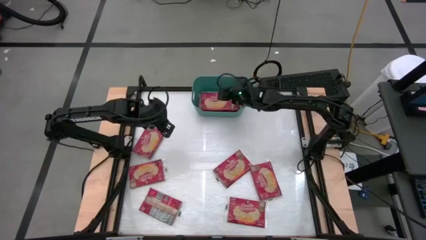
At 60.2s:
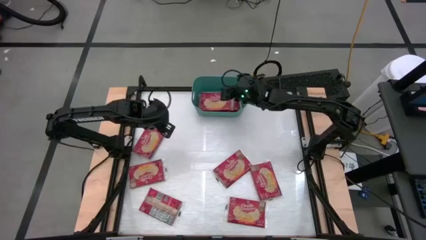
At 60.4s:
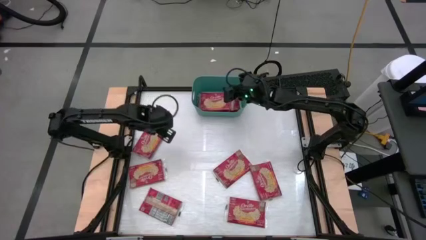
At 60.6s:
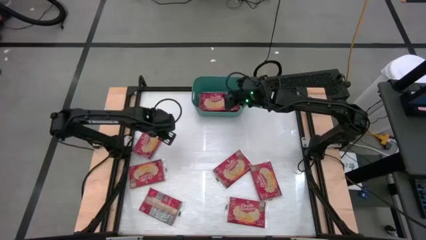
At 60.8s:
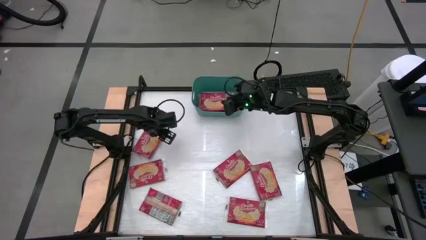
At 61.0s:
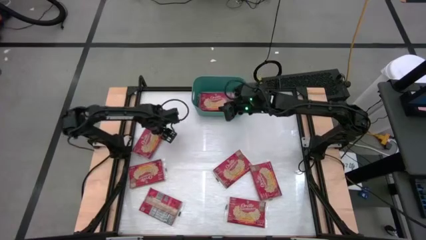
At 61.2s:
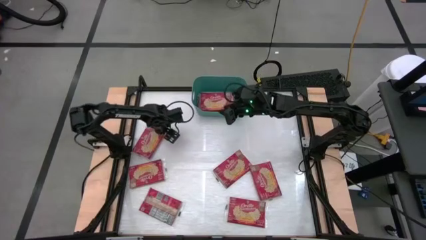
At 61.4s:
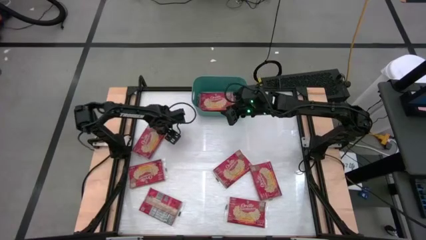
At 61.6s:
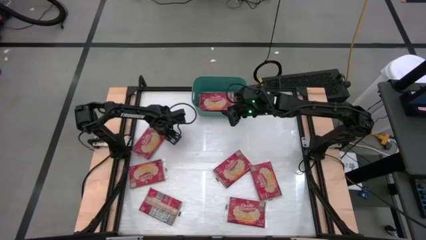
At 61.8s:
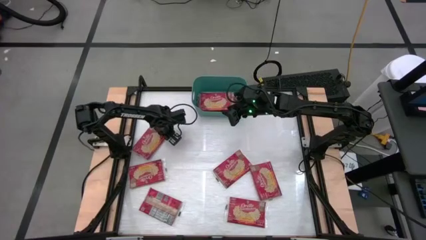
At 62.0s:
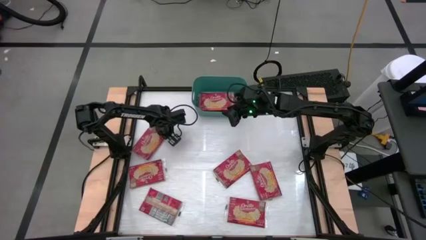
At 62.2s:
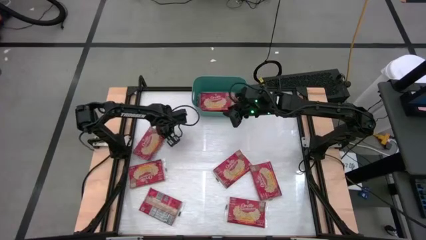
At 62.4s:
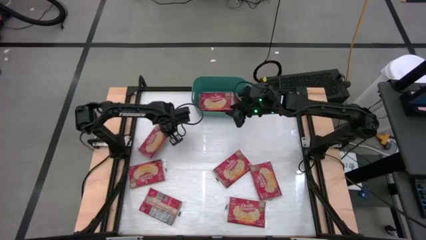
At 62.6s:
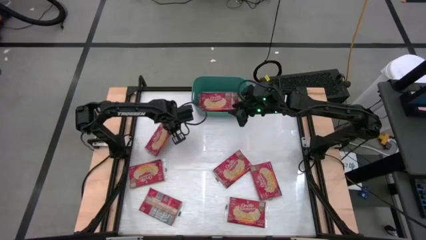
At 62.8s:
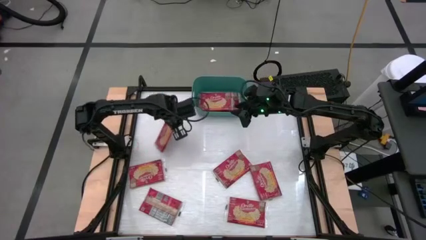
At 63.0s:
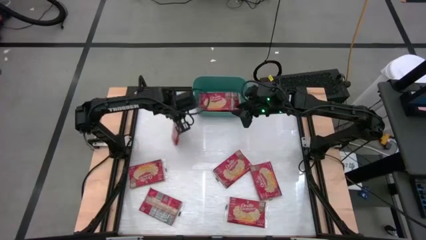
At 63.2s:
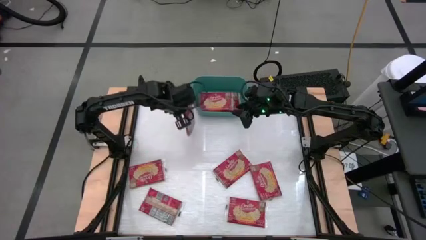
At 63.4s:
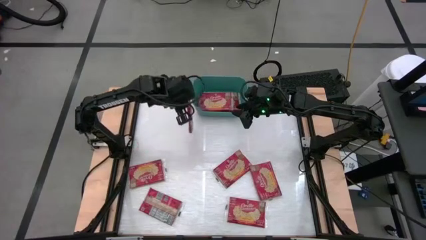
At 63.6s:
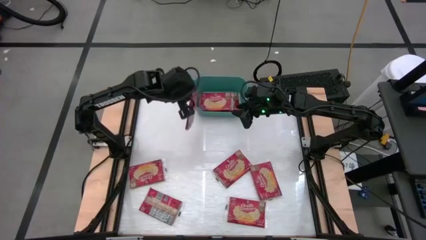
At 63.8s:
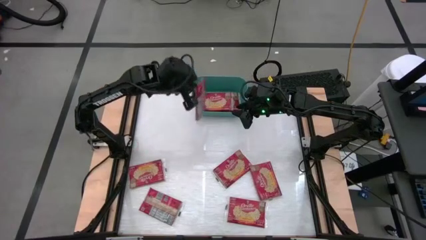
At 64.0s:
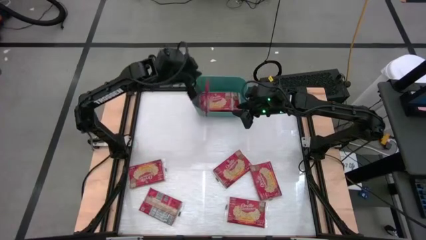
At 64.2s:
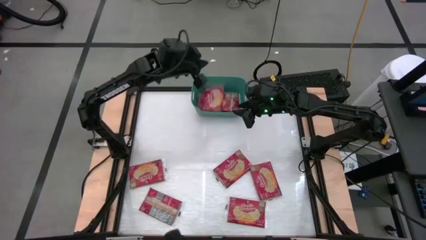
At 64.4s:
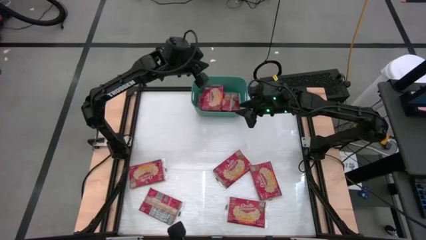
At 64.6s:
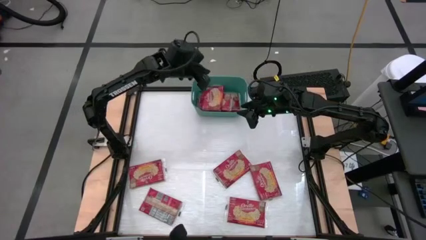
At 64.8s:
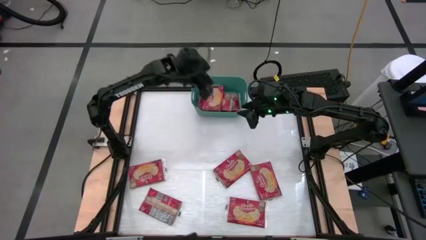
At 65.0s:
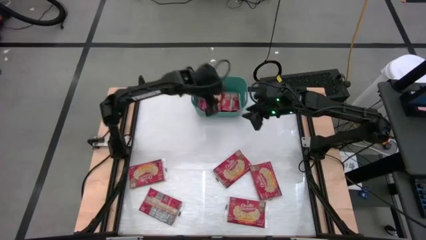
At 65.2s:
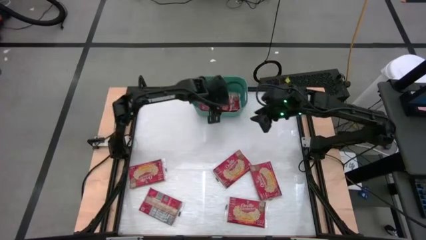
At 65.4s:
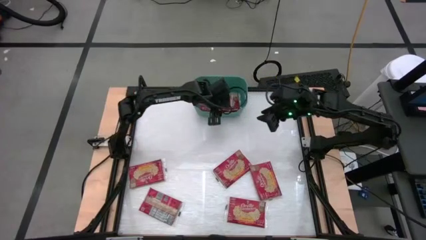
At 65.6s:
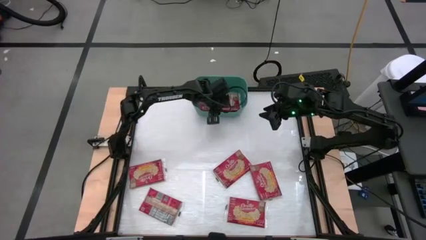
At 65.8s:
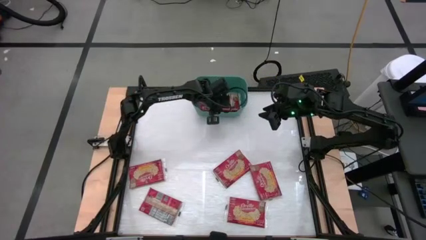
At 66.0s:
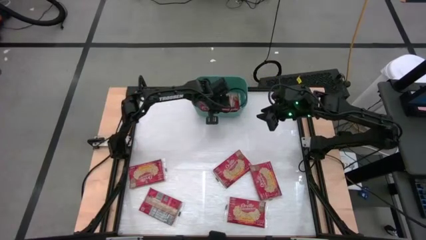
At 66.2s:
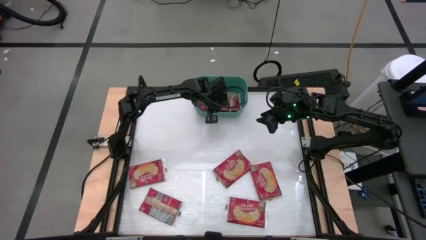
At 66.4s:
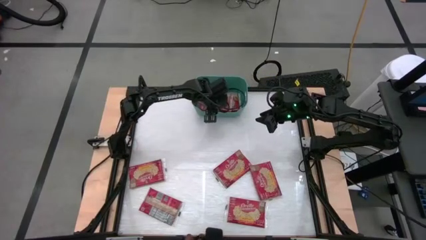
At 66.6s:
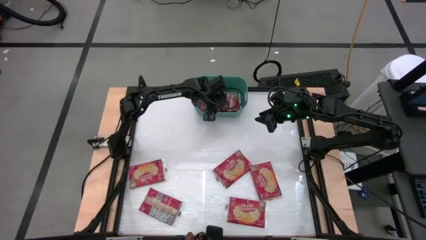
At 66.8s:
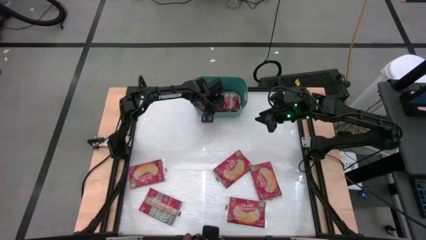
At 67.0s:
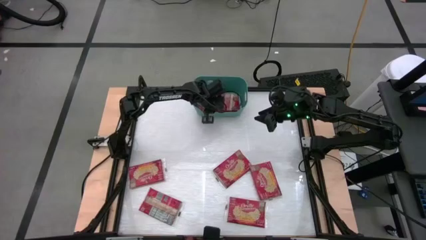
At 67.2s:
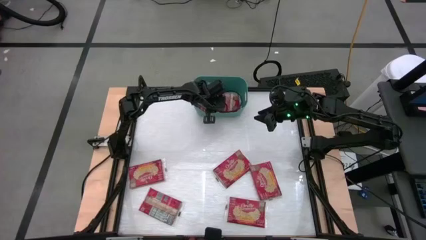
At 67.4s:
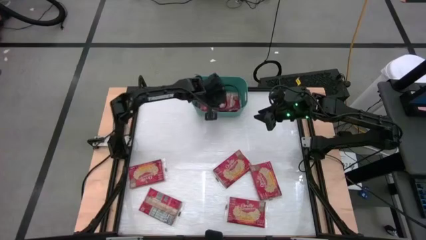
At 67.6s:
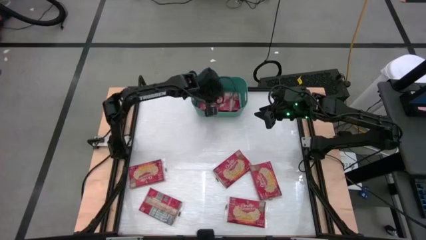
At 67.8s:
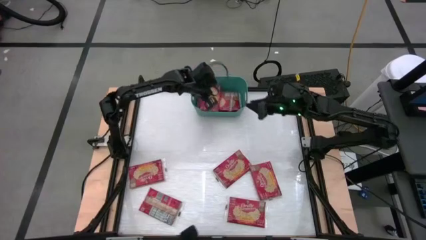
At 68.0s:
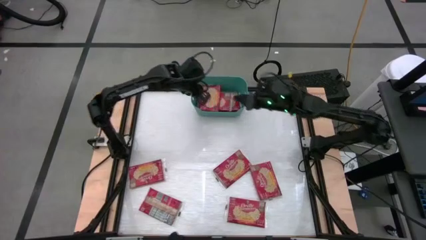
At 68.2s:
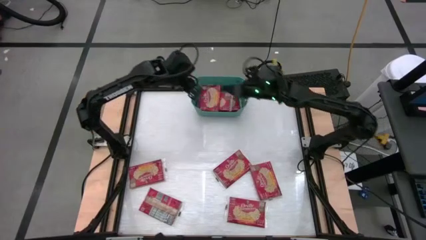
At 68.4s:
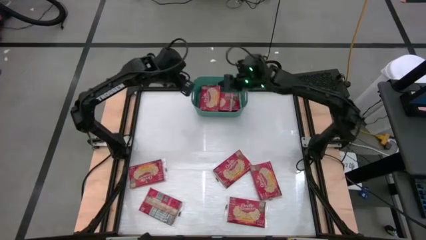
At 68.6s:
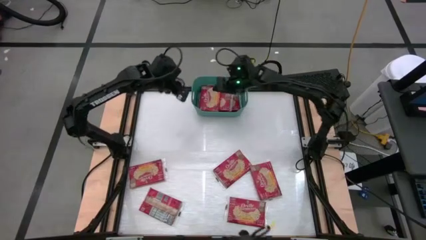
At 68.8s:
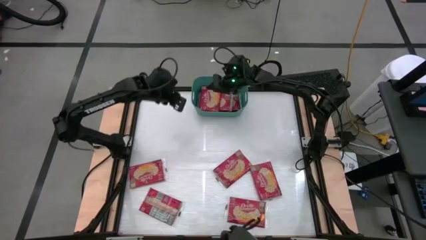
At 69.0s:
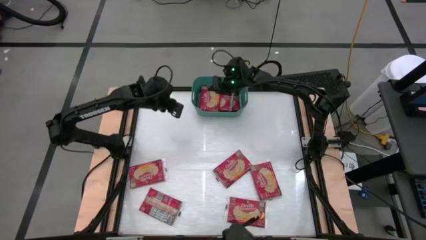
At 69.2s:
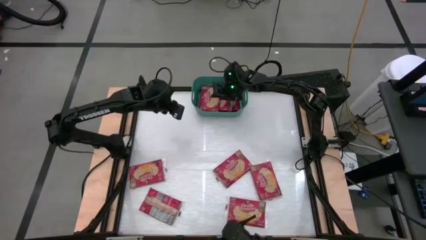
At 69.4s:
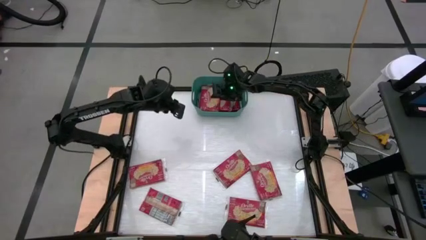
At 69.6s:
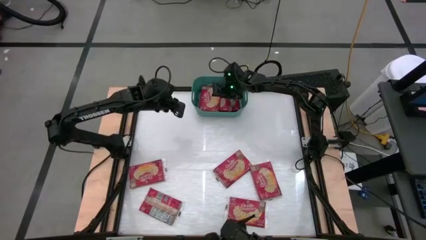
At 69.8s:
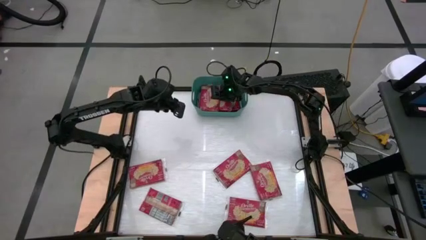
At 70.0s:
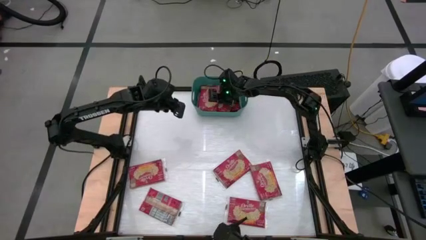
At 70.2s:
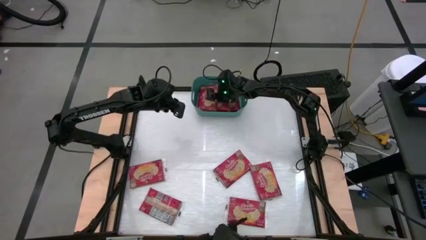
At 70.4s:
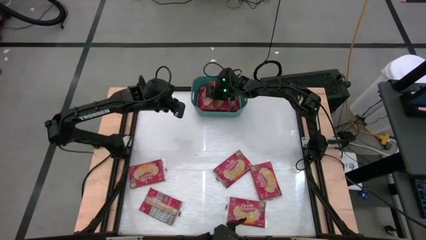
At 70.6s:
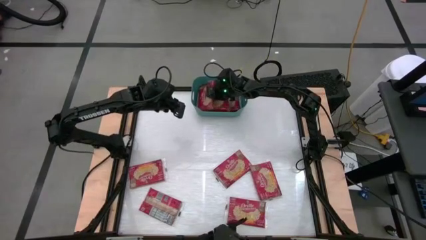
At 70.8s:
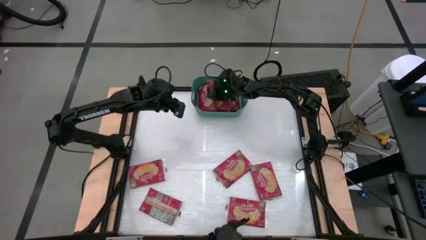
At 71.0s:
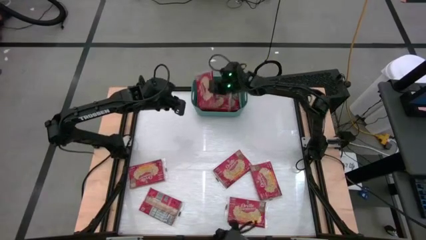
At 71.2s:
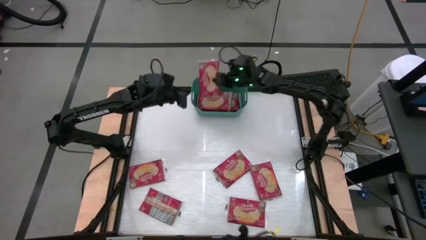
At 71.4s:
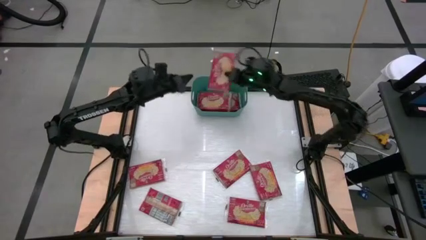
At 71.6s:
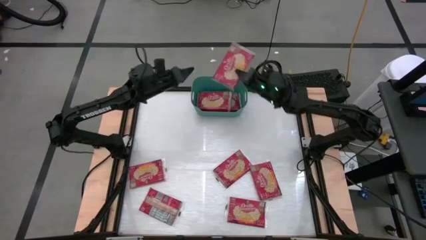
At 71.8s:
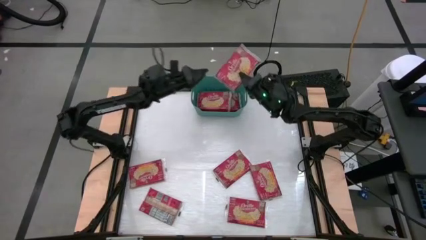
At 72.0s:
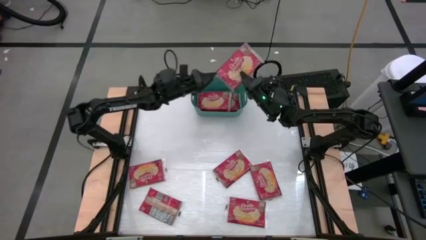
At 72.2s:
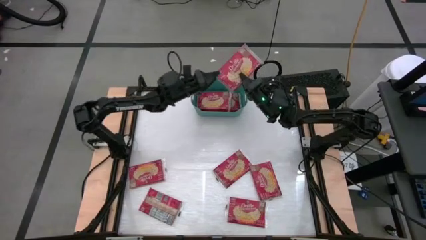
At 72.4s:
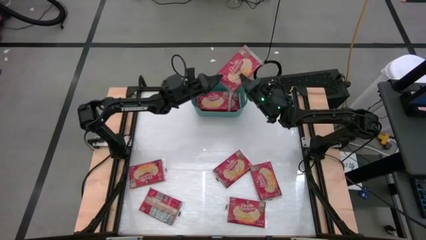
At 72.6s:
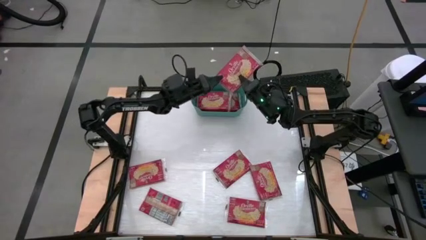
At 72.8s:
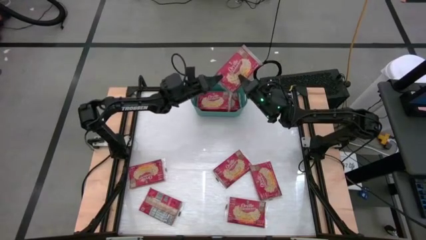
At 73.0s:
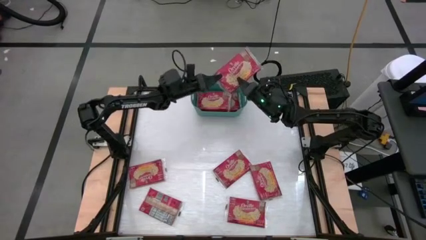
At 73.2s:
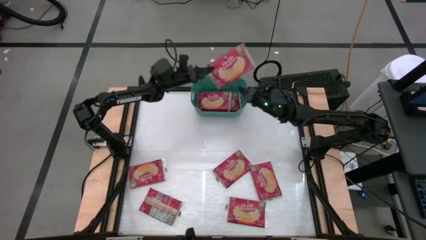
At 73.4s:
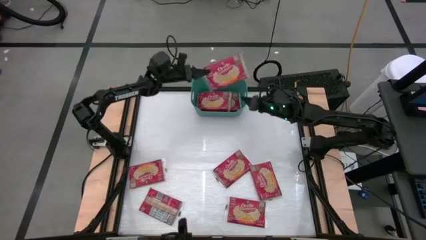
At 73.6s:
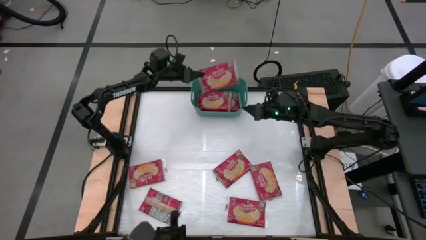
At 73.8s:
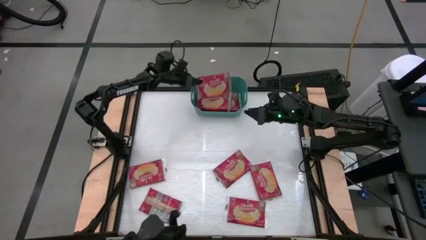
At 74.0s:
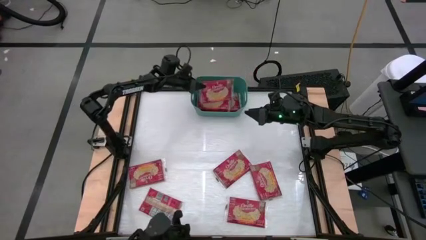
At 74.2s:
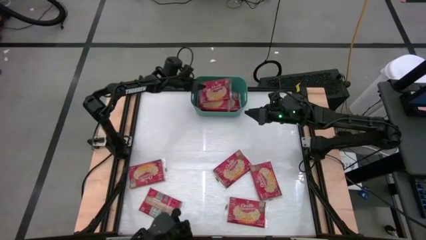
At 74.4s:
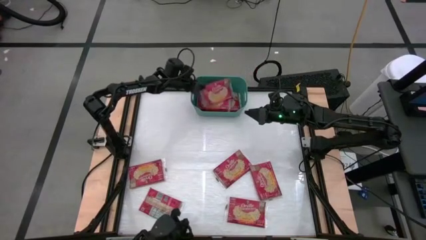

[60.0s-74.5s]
Task: Sort popcorn bags into baskets
Put the popcorn bag into the green bin

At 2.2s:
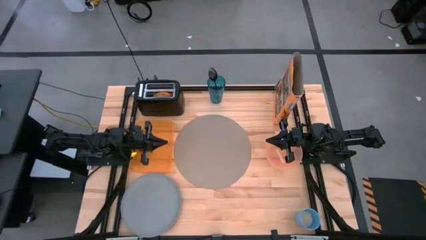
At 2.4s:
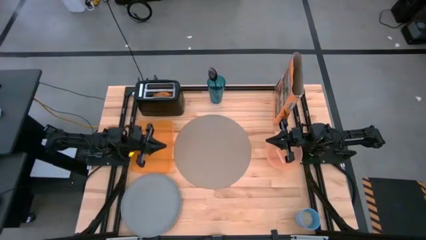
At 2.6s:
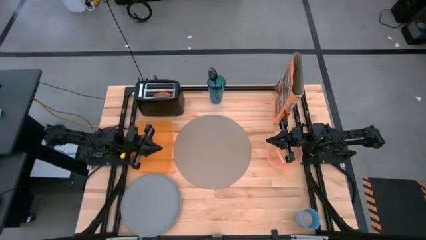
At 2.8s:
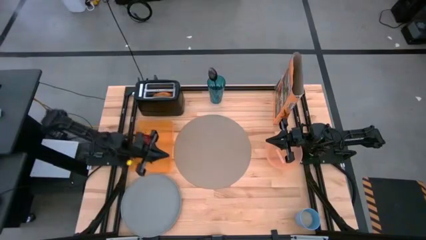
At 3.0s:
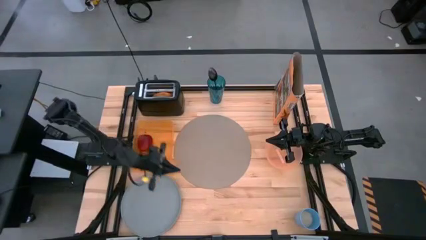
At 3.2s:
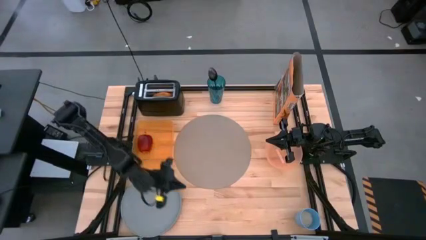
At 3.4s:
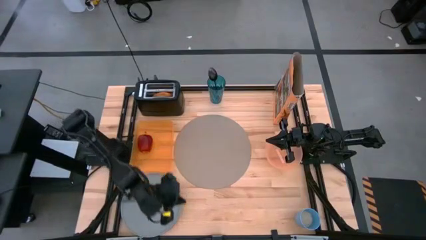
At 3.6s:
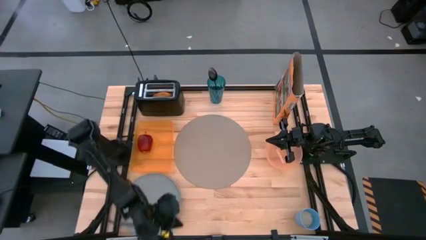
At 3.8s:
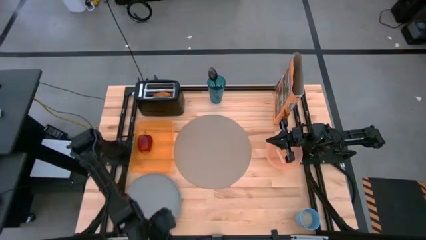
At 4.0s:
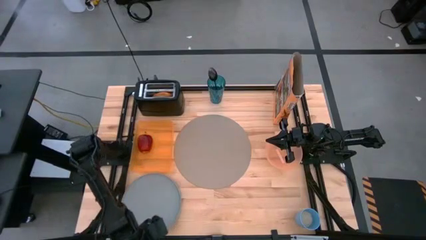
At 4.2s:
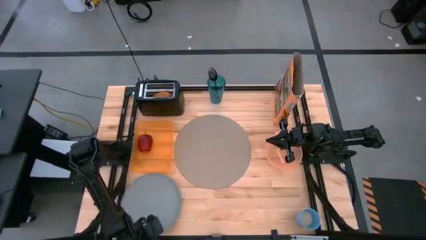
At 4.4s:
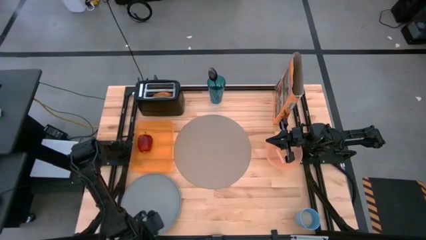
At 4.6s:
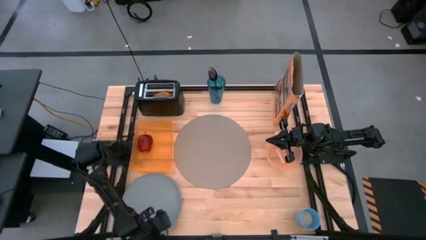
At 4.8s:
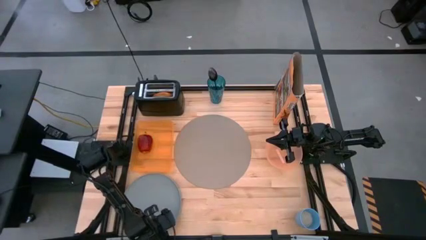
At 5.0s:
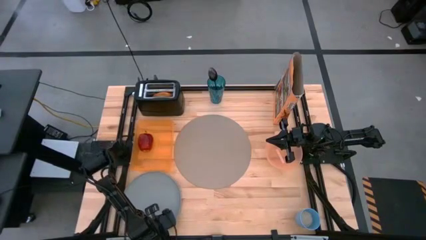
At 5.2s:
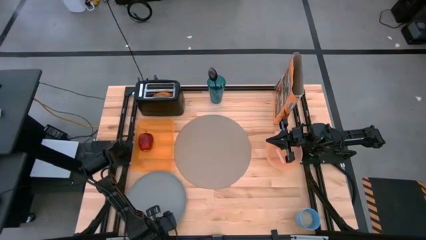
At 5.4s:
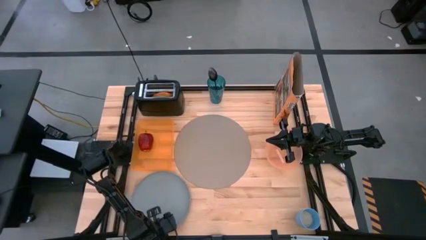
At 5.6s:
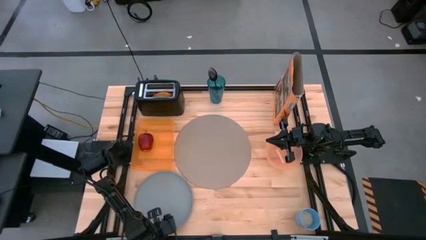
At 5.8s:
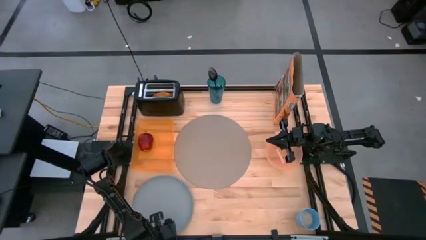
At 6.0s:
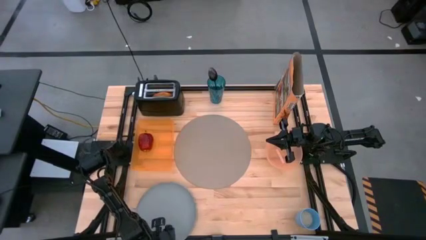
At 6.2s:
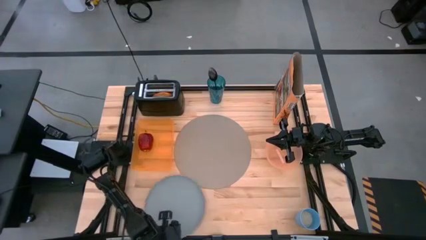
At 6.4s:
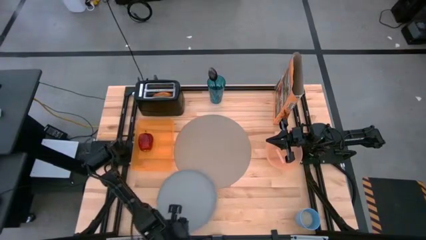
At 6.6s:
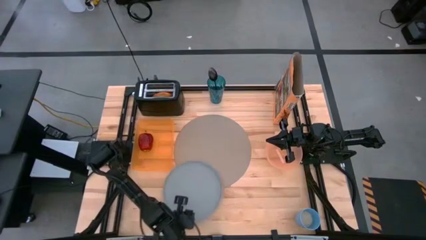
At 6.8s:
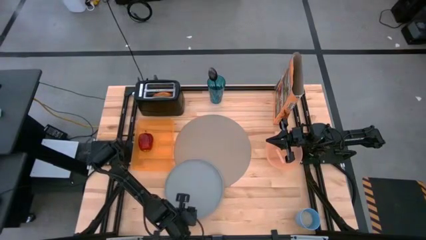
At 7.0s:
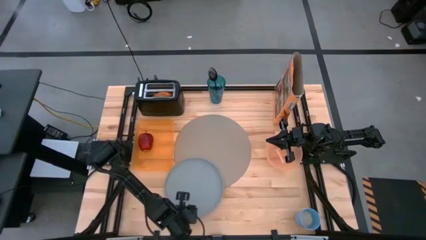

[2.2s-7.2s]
Task: Arrange a breakfast setting
Put the blue plate on the bottom of the gray placemat
